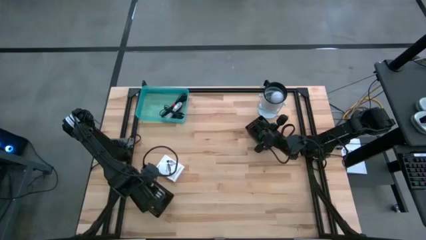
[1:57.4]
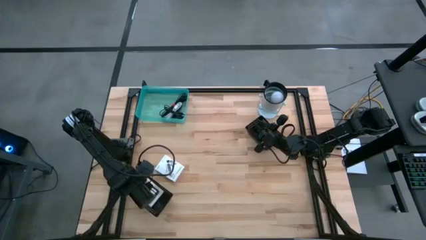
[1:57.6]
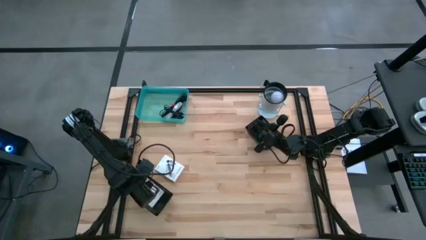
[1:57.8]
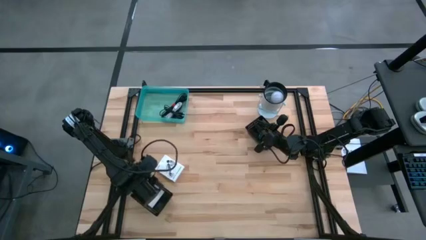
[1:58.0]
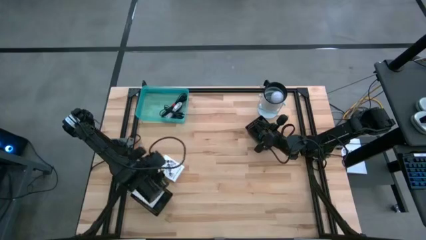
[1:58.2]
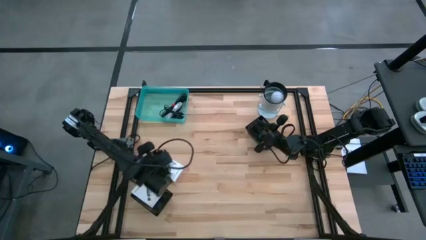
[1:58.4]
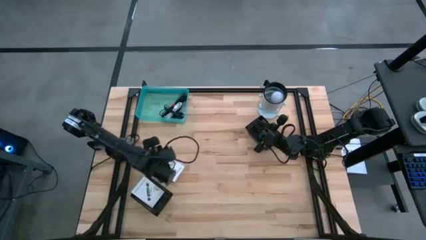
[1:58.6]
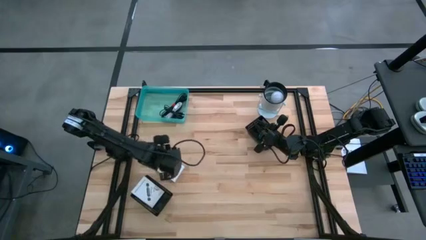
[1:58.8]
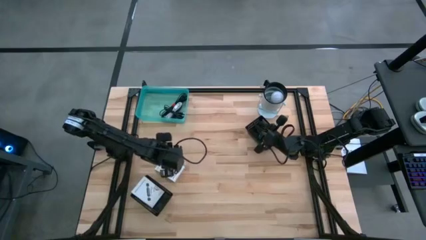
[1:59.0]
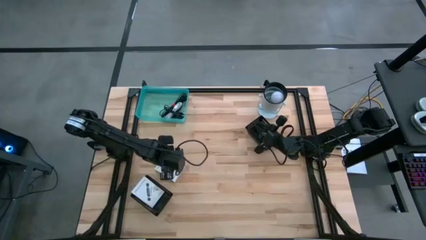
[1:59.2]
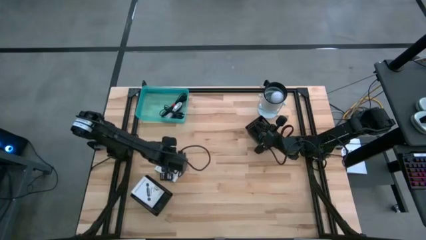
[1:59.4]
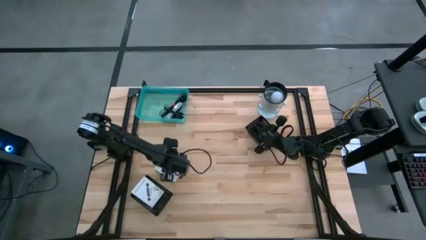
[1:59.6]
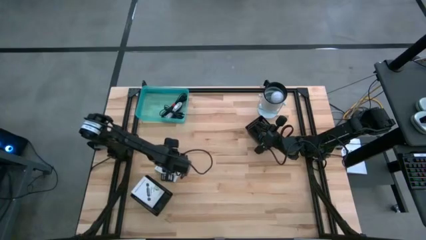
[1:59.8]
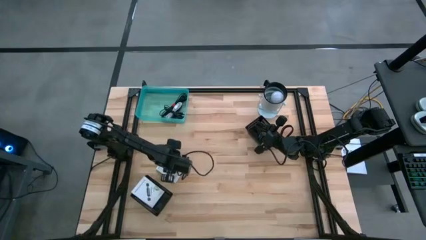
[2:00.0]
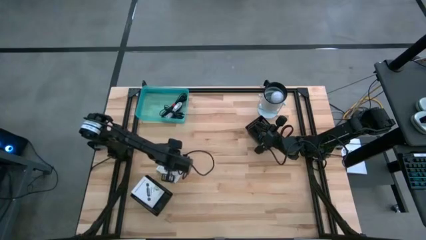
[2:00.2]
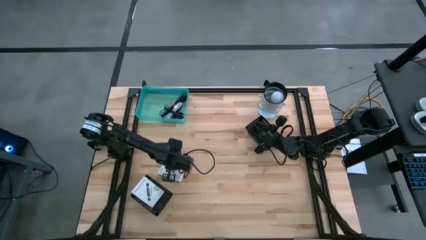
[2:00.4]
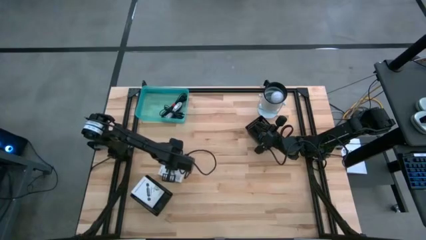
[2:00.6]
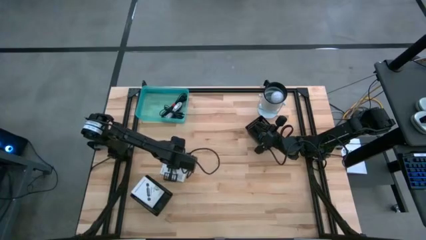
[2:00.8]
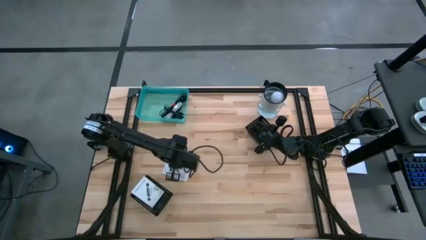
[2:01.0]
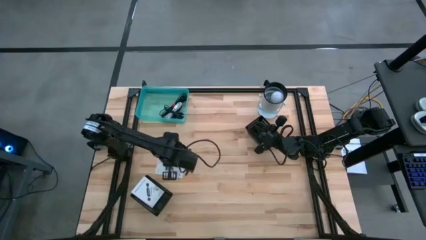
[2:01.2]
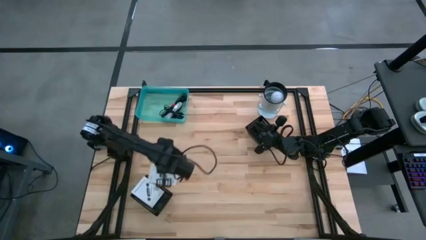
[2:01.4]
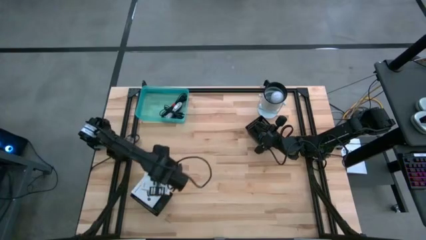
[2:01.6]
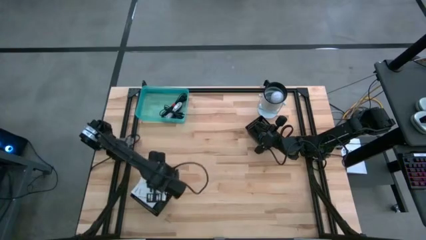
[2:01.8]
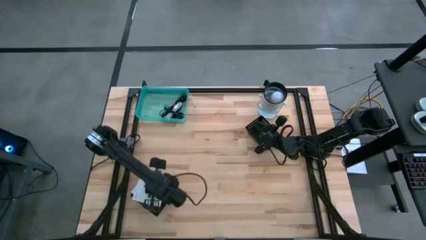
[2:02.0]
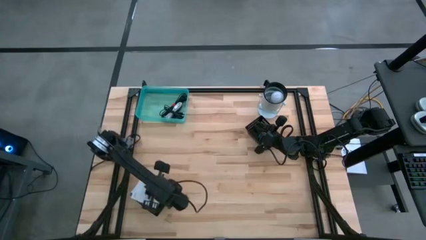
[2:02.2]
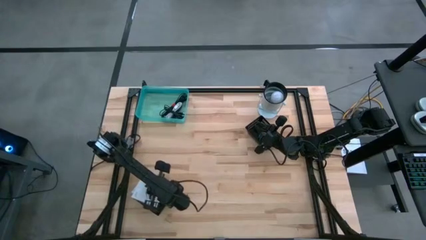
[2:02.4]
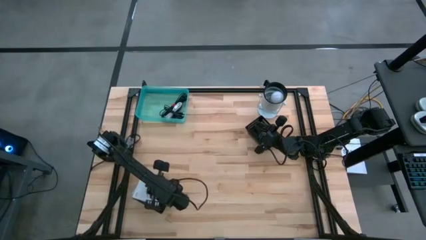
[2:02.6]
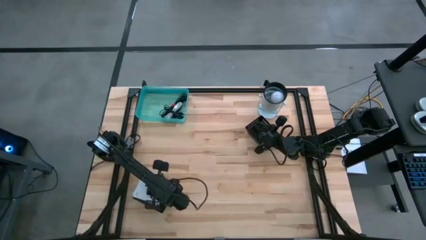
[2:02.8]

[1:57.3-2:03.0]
Task: Pick and place items into bin
Put the white card reader box into the bottom black bin

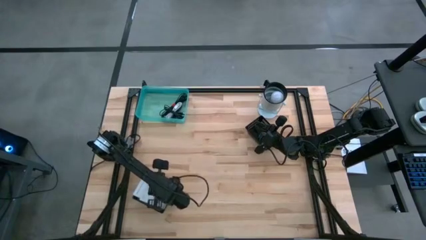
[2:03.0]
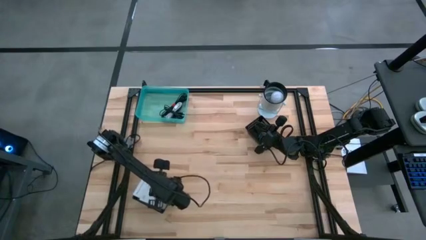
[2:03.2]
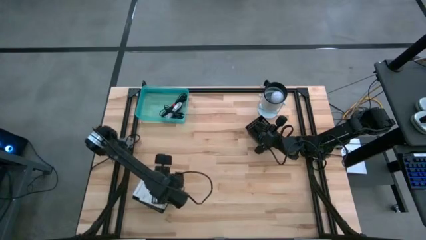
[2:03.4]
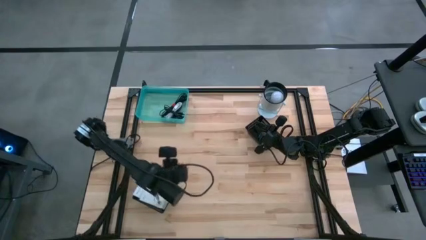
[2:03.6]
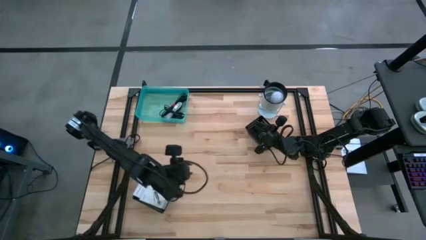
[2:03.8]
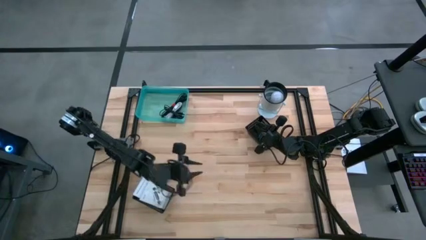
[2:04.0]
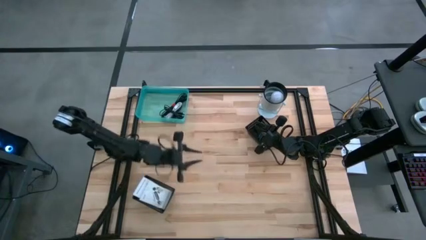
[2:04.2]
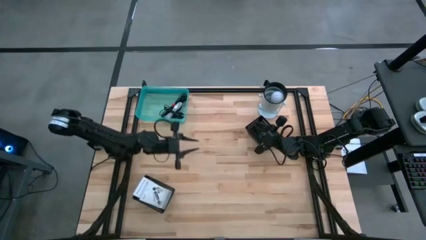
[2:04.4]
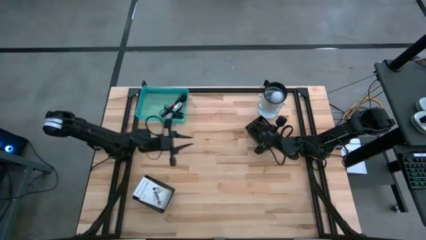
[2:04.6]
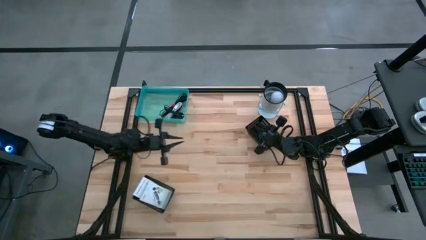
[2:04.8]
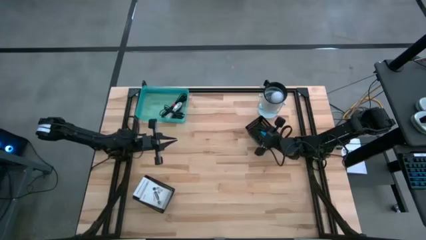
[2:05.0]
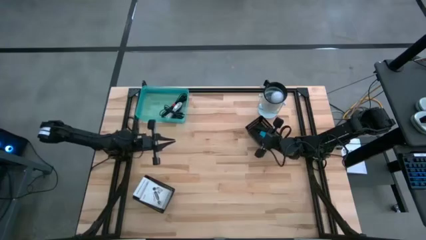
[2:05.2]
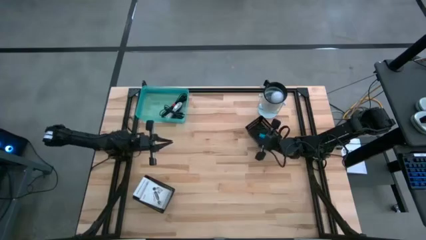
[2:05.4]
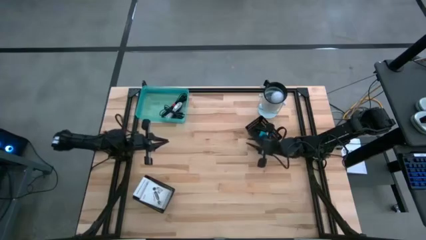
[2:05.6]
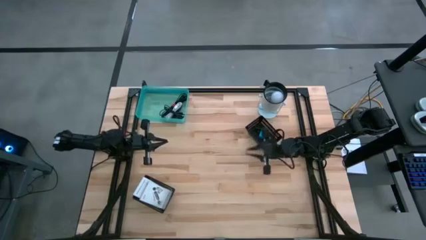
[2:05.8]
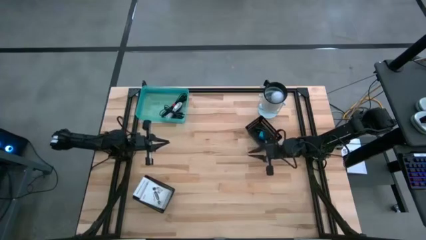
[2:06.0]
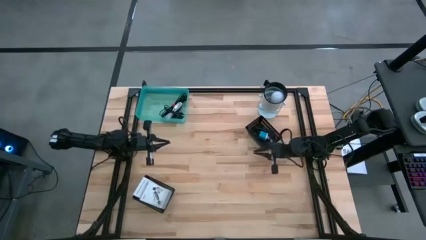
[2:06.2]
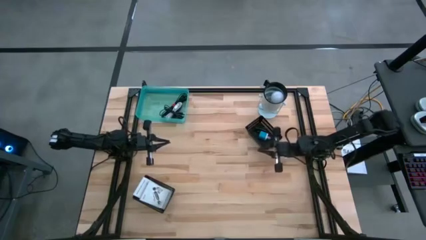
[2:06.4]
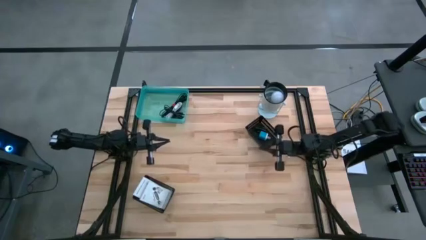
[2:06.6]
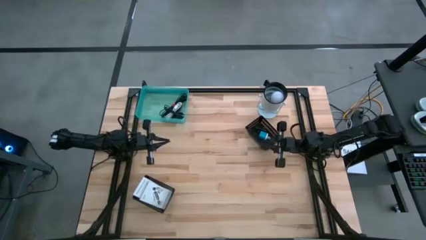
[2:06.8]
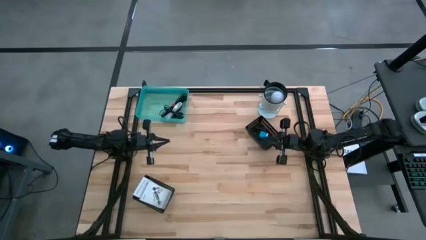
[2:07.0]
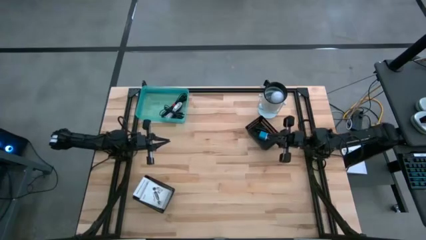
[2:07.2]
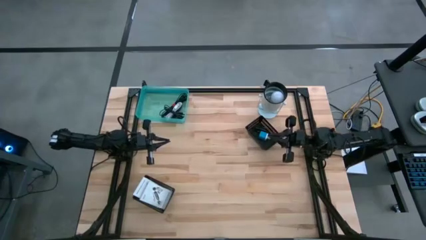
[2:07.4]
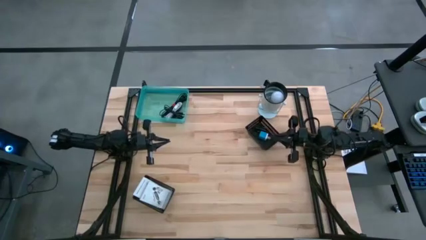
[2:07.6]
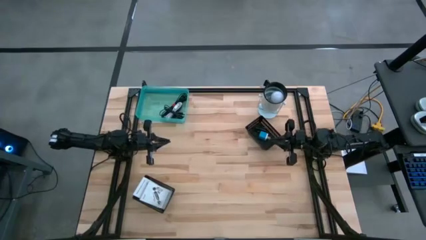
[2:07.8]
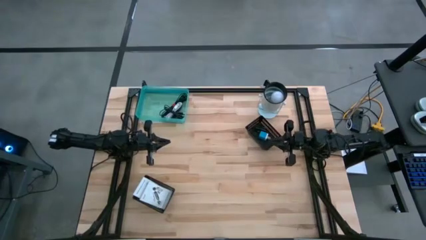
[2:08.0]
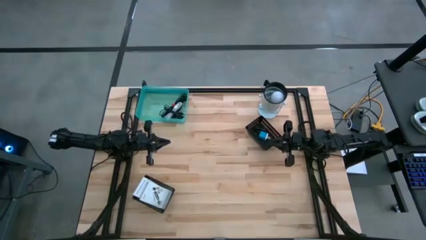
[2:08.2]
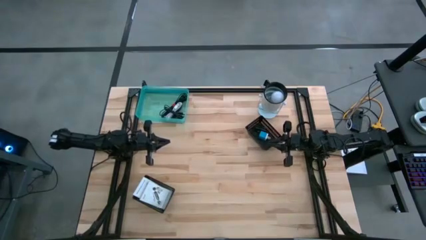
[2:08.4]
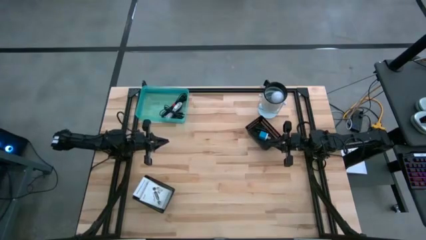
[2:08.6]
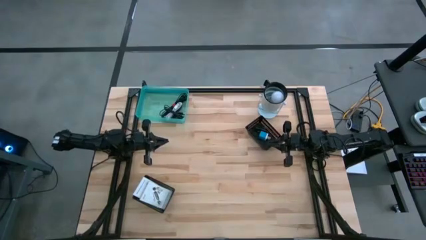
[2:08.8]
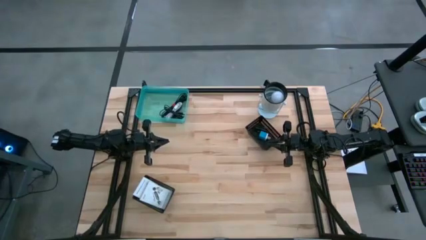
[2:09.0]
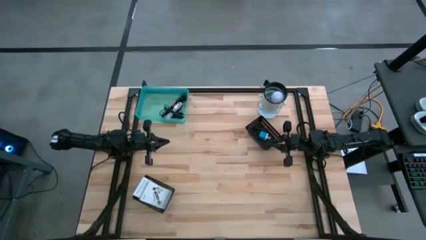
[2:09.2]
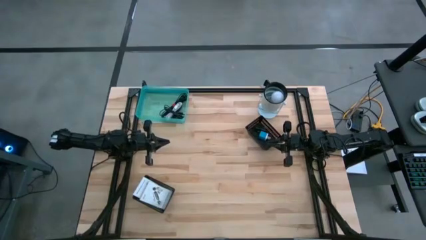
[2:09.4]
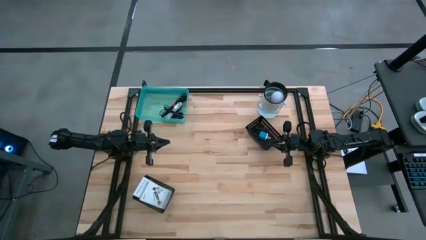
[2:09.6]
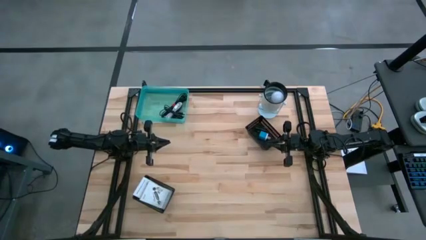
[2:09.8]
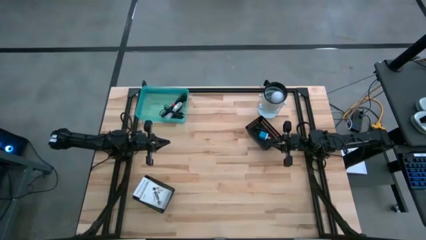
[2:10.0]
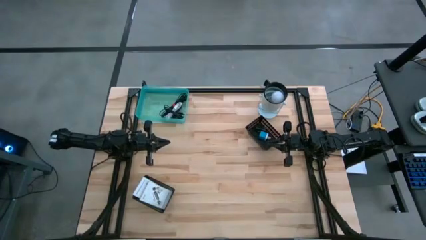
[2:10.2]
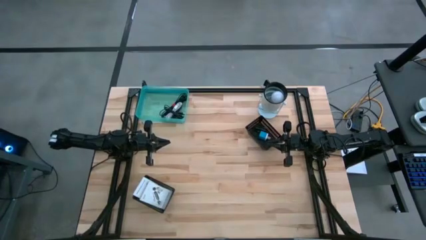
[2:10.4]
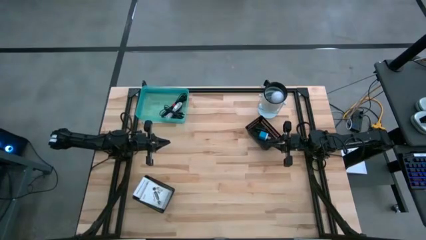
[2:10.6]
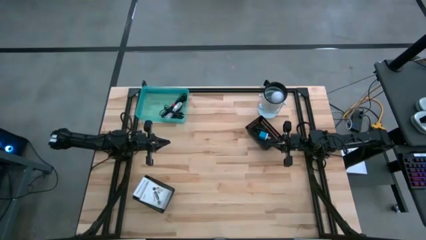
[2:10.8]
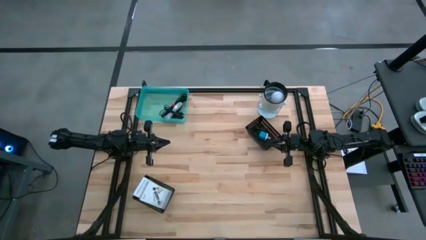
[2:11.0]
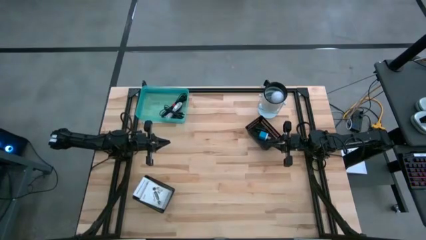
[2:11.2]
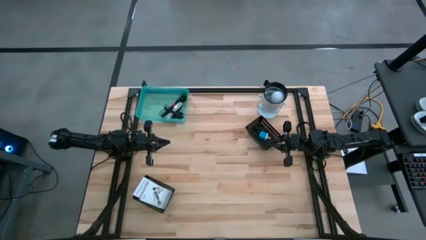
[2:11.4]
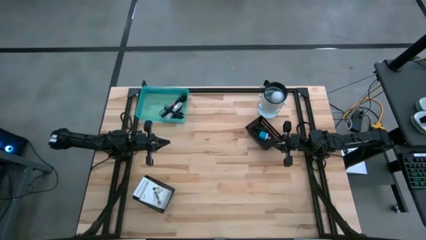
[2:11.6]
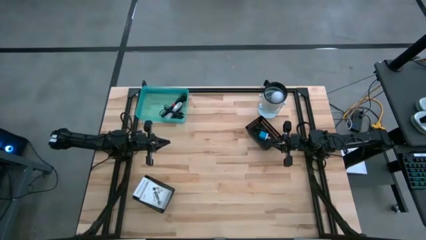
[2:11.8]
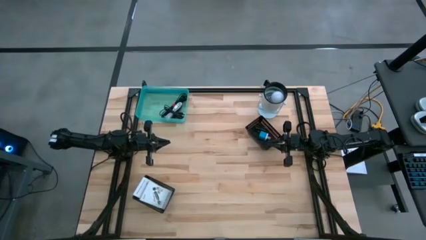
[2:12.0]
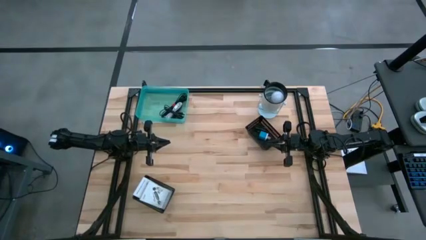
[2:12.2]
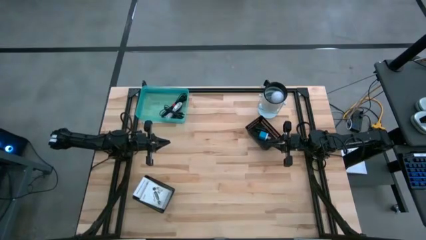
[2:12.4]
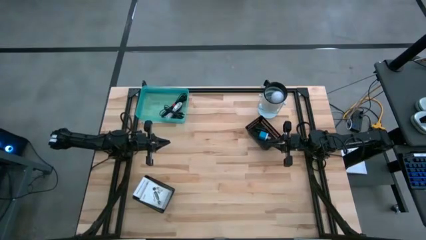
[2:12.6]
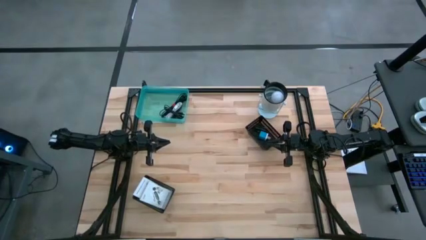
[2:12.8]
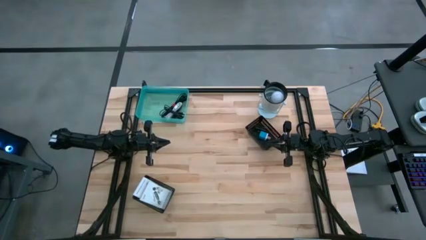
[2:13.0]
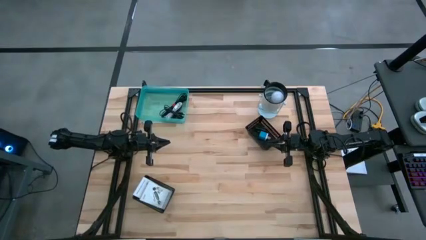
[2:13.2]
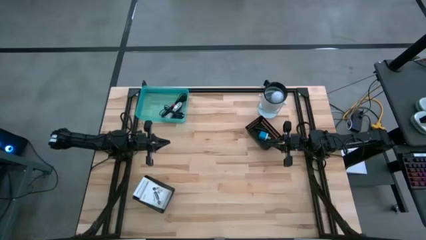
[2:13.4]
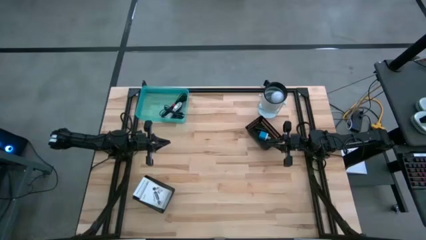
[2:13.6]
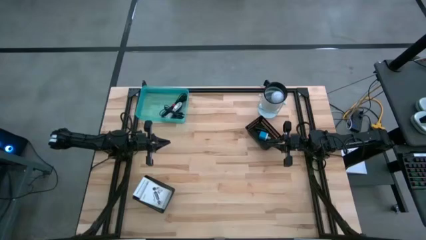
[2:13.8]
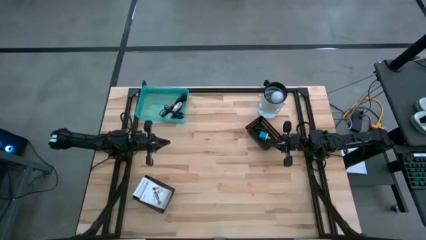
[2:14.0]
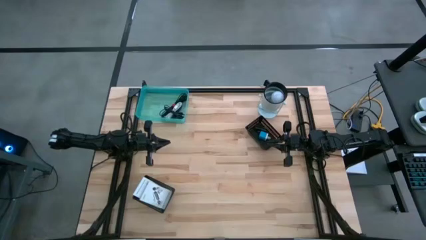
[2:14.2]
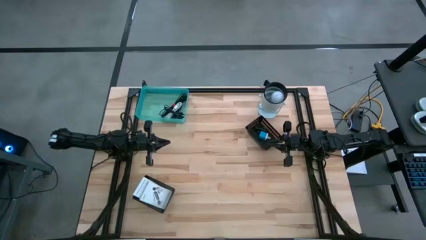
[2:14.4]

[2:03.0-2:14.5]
Return to Home Position
